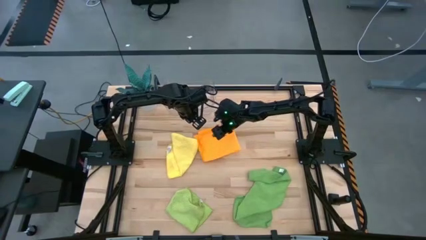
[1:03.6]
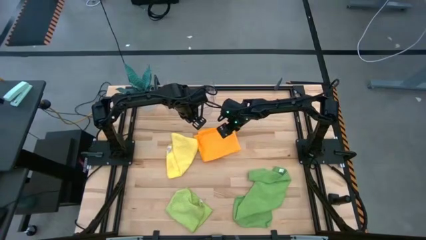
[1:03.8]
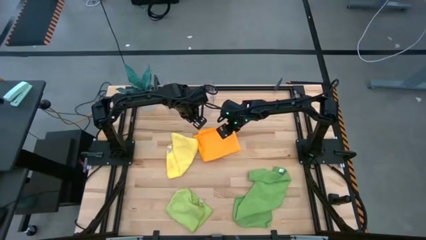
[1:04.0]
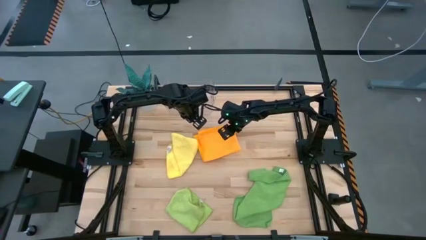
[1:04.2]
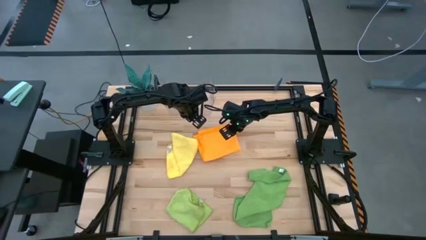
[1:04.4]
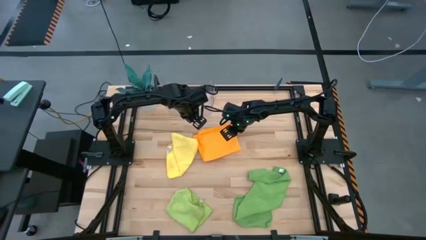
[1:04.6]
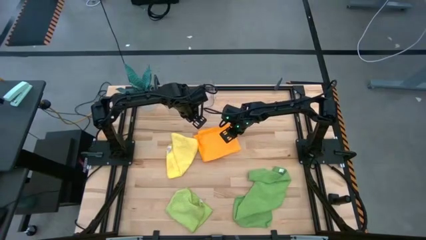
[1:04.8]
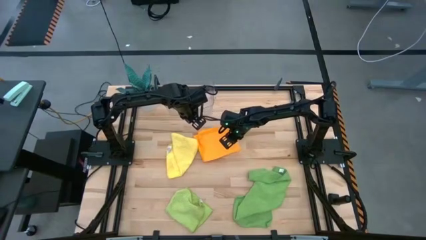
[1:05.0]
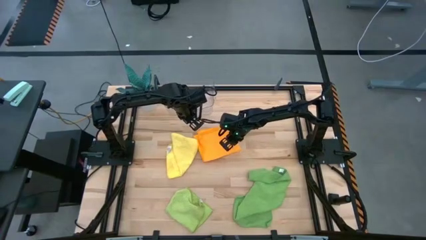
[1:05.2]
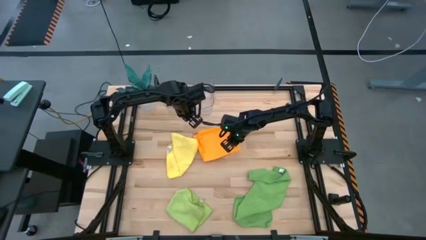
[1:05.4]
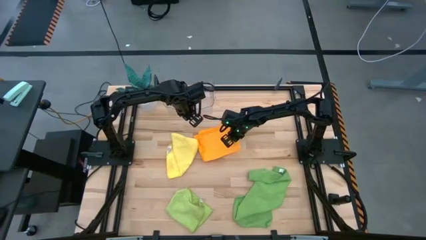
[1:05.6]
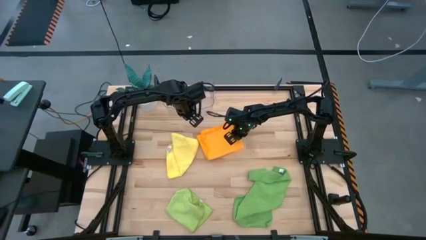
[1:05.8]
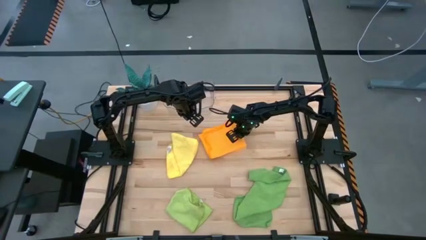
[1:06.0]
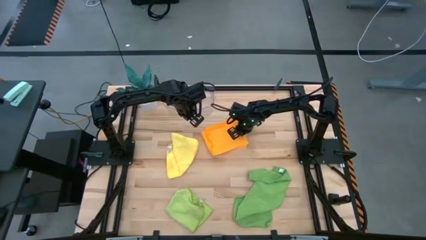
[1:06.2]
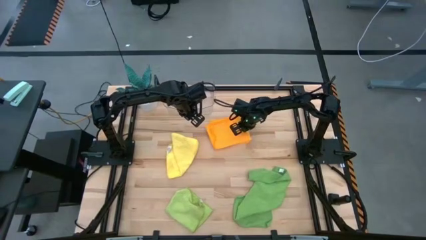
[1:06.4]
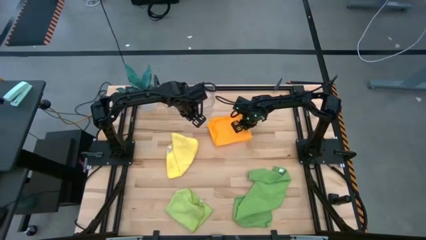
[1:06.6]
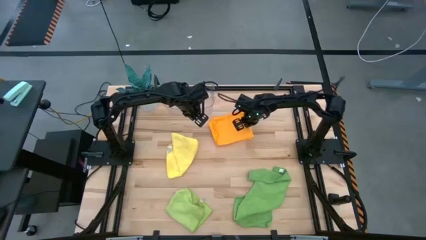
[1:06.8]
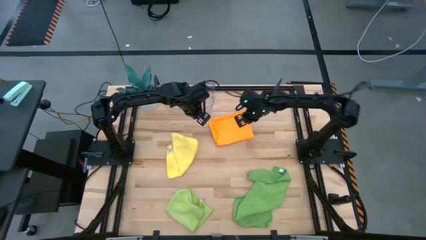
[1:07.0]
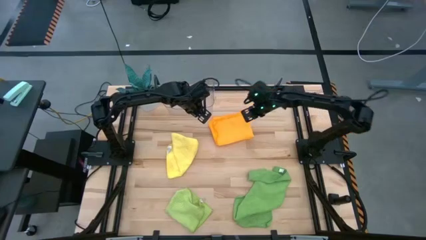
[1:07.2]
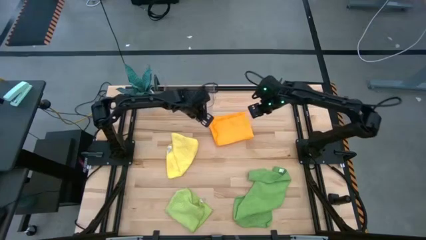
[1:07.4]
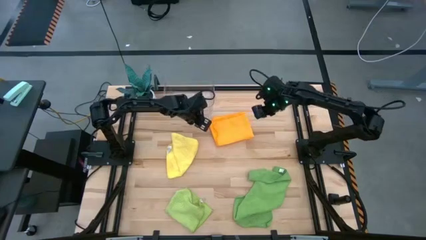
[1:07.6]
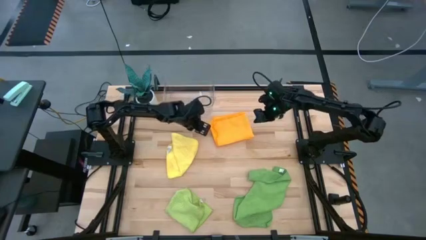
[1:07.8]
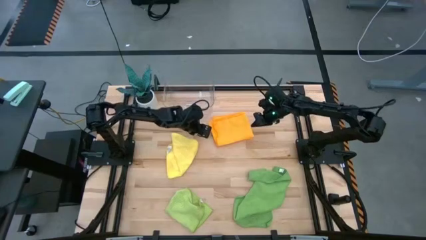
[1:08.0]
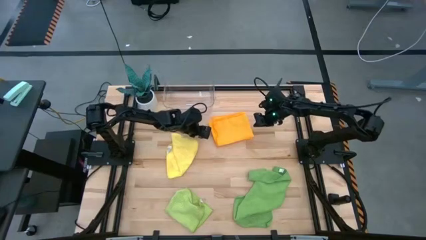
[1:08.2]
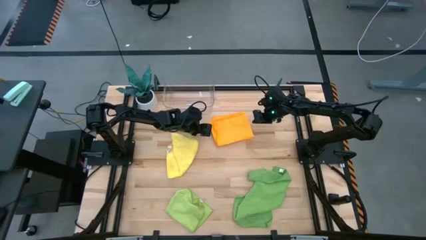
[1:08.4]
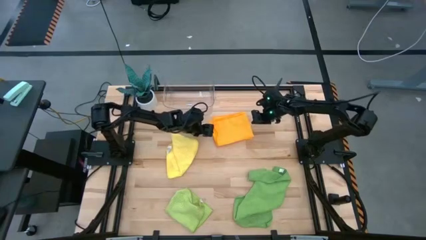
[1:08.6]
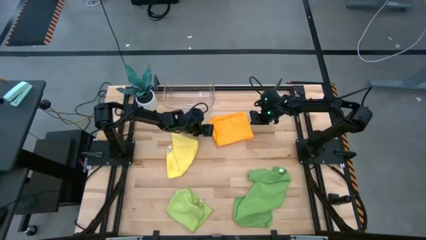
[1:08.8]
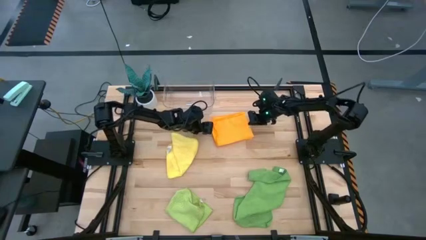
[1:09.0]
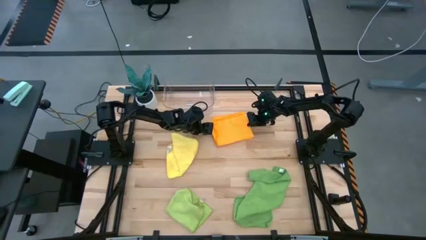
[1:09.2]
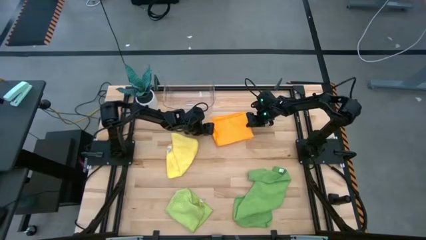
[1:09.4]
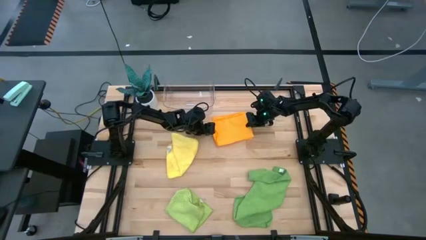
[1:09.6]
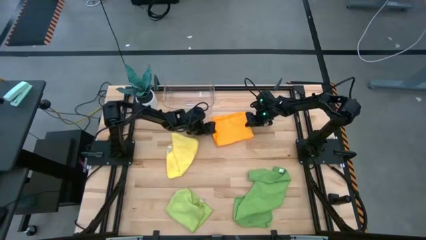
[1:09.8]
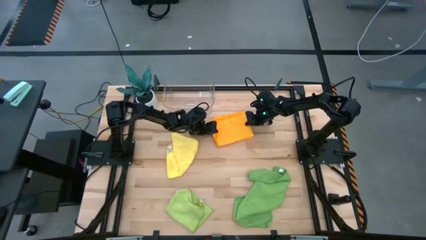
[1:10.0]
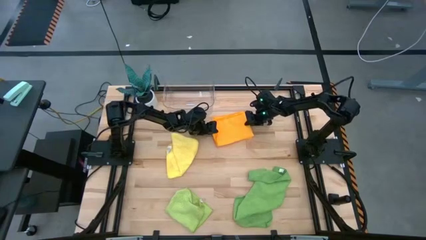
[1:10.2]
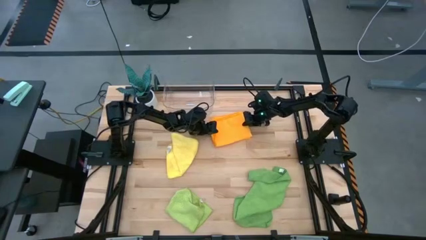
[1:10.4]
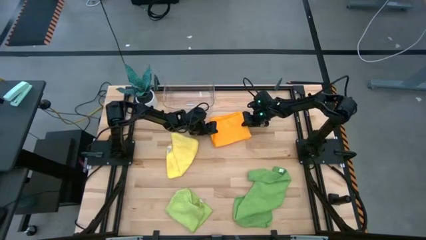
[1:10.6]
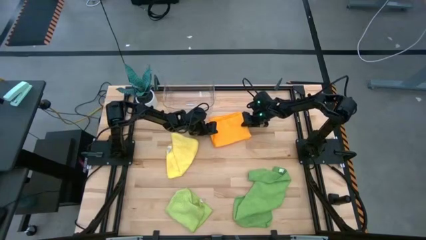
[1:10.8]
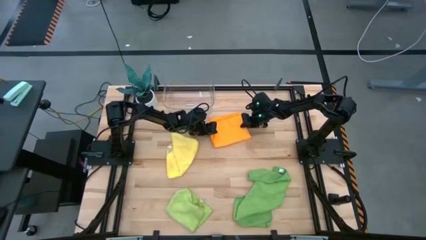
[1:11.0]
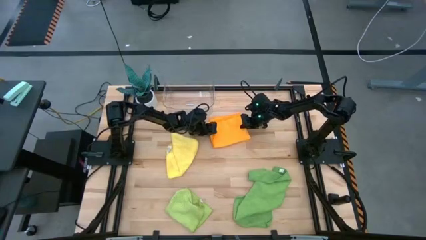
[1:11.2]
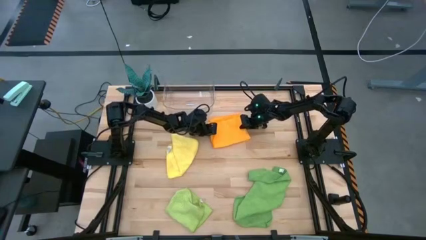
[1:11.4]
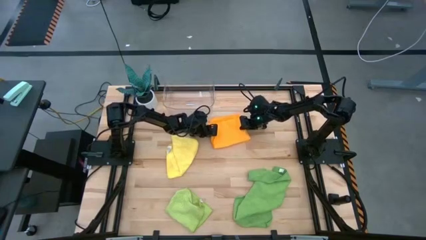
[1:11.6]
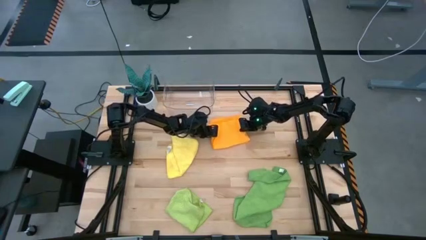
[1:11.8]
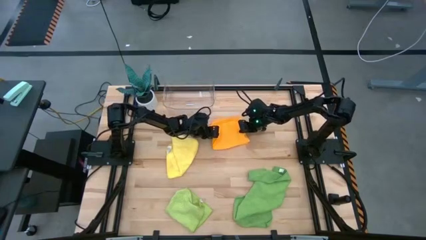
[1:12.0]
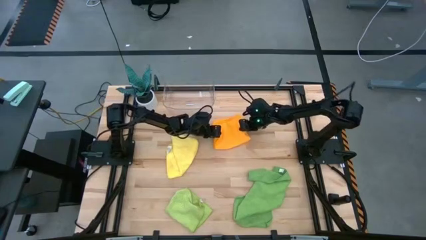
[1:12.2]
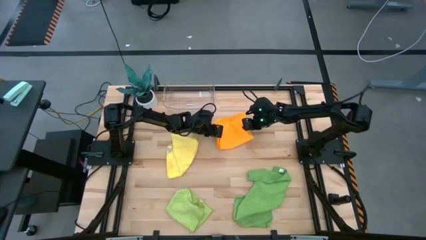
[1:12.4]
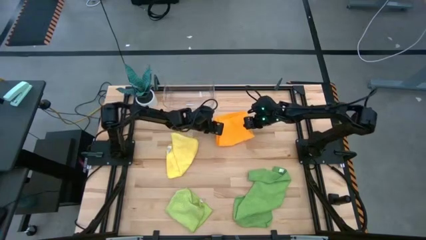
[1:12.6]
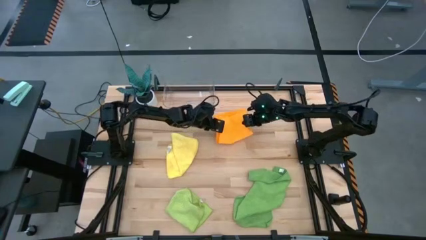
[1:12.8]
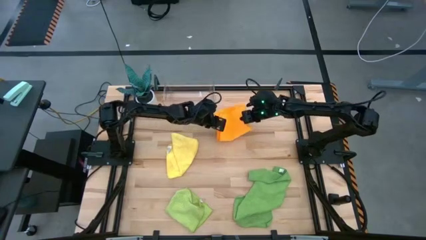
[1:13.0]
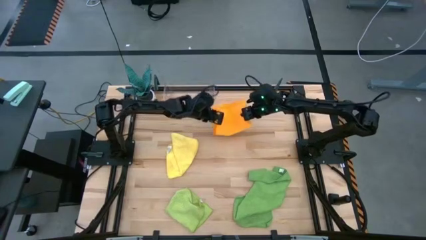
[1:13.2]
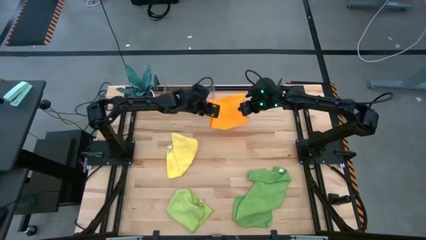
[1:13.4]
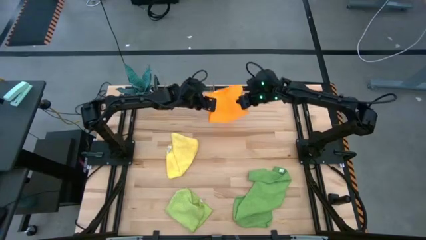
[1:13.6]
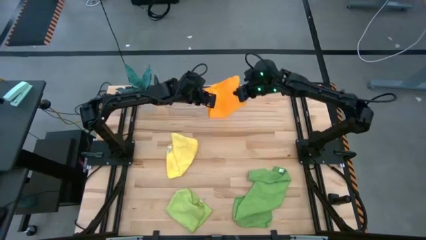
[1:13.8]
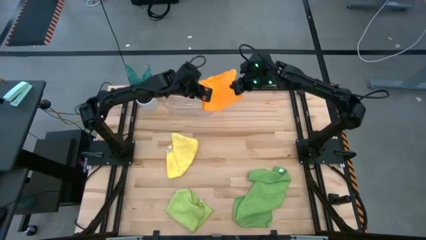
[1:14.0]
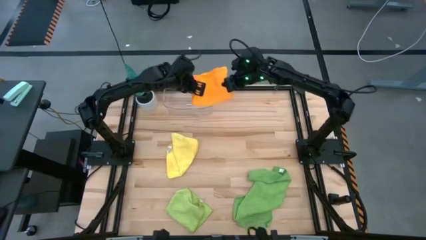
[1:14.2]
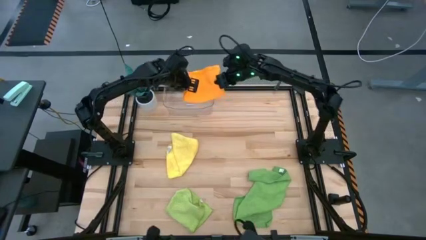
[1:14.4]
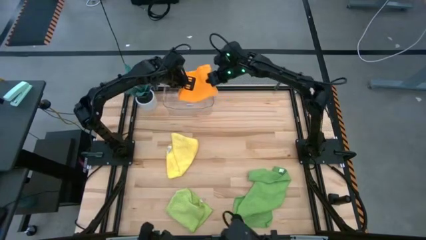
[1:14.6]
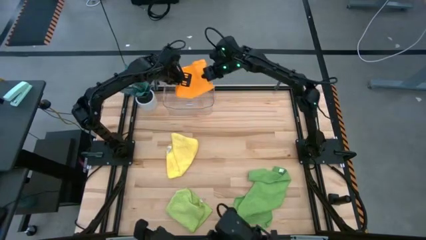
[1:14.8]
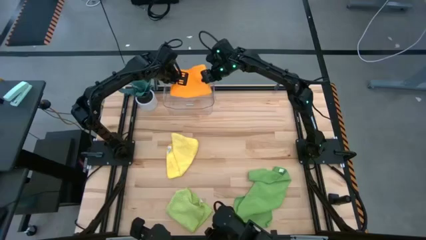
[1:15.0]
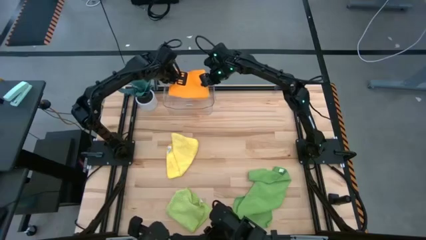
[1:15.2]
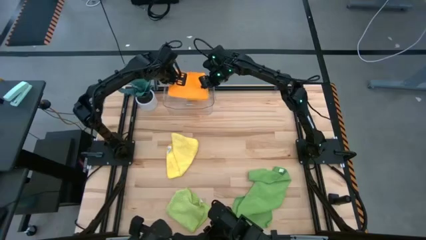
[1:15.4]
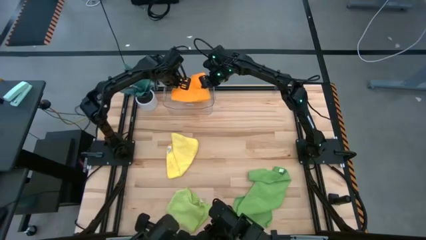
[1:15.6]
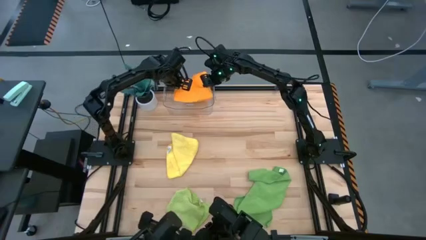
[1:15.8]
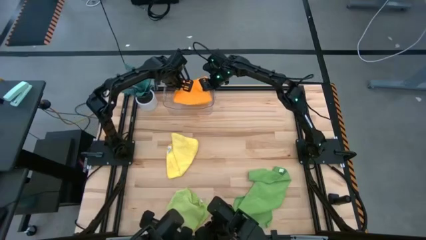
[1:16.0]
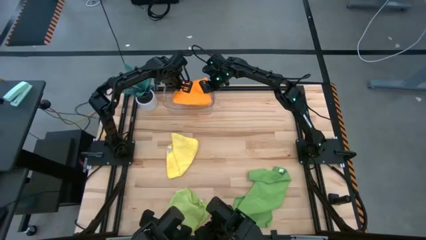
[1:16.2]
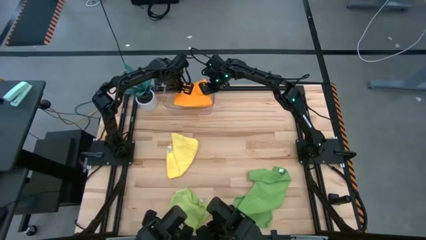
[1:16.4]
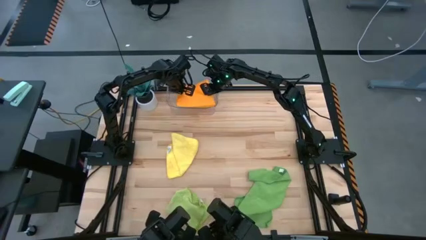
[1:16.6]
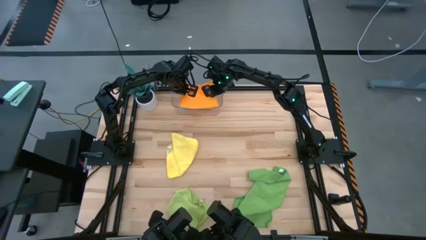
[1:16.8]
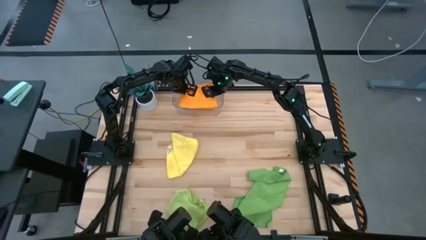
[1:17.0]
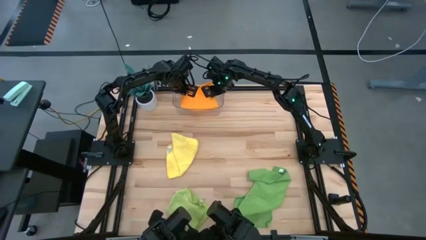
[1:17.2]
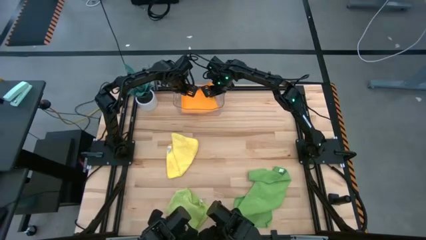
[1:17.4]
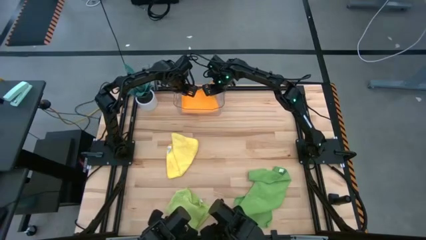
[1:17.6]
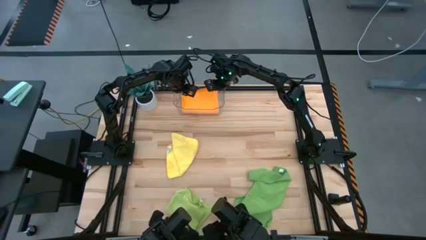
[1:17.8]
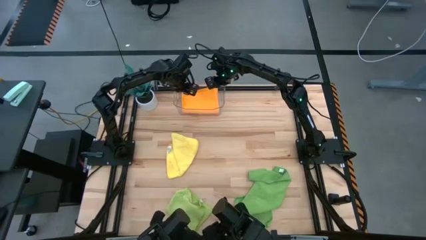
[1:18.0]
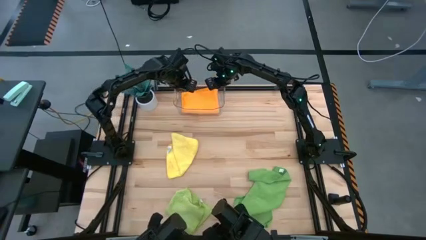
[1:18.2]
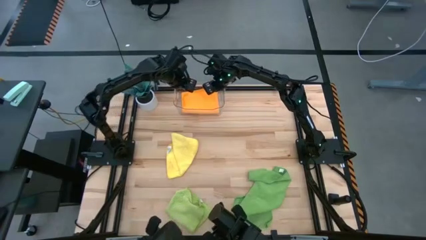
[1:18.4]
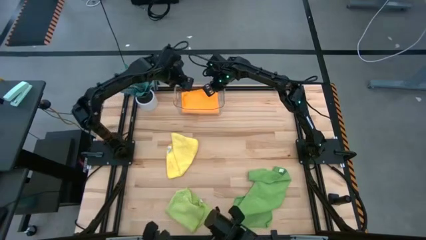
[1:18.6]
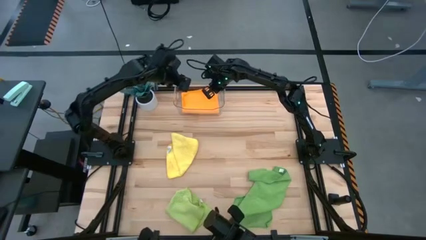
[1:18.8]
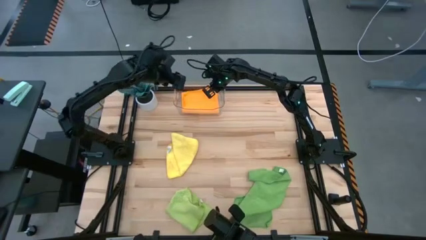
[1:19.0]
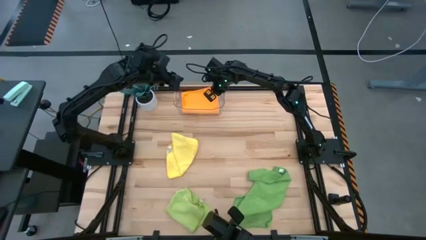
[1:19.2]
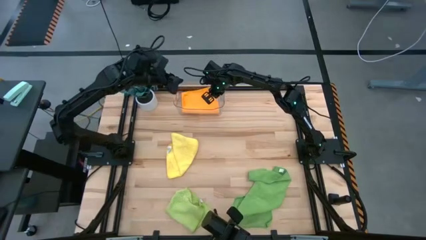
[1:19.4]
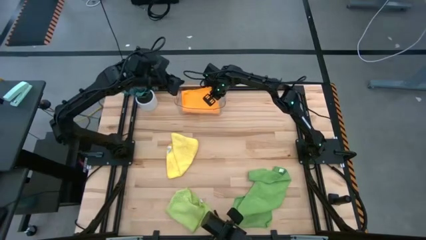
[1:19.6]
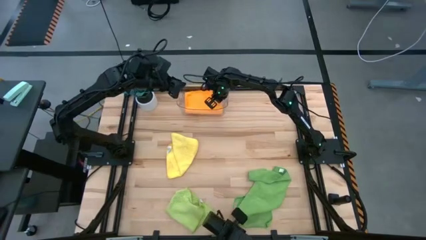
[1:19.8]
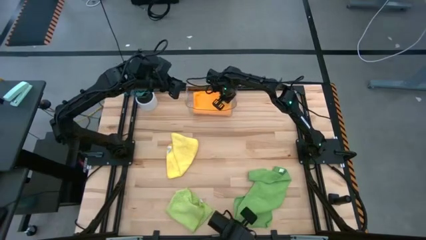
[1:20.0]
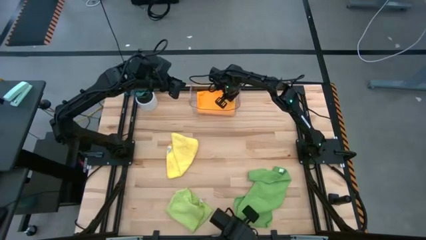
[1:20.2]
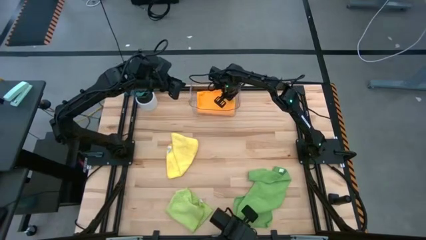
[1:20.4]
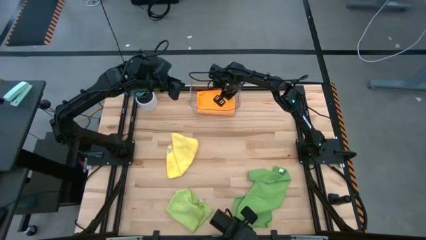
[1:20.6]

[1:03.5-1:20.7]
Task: Fold microfiber towels
Put the orange towel into the transparent bin
